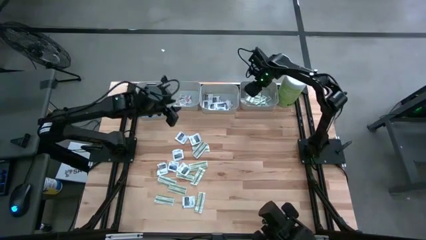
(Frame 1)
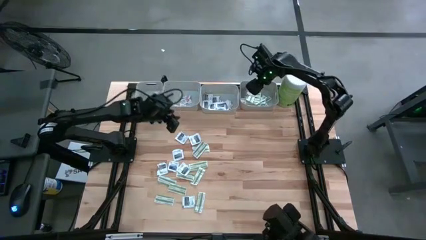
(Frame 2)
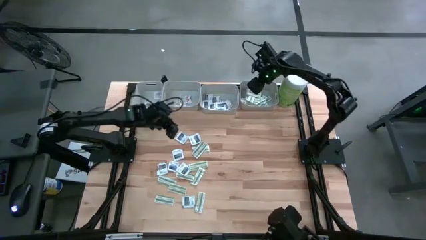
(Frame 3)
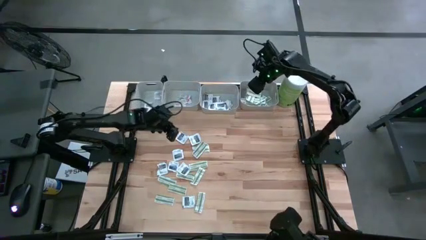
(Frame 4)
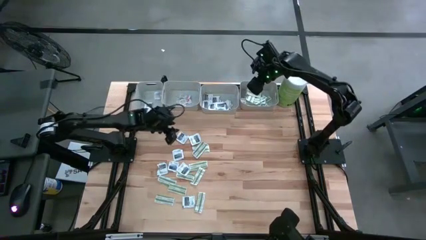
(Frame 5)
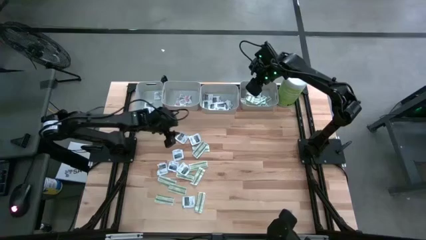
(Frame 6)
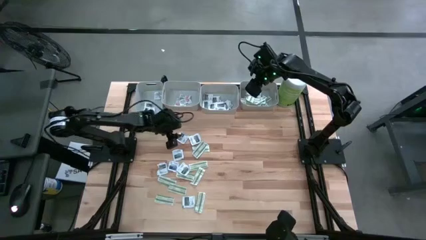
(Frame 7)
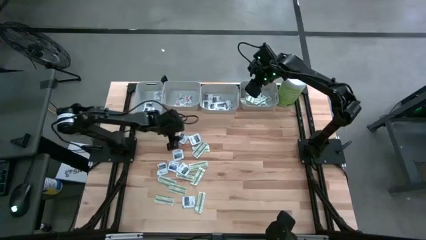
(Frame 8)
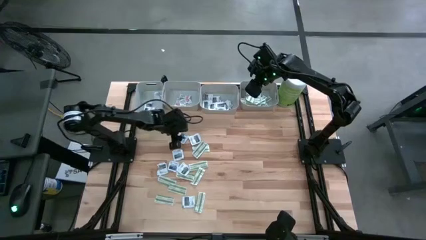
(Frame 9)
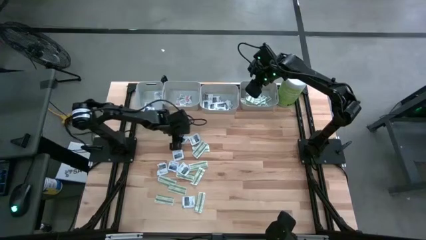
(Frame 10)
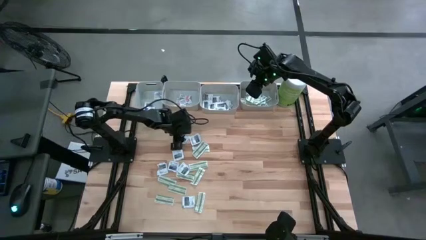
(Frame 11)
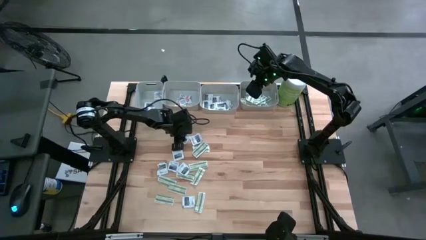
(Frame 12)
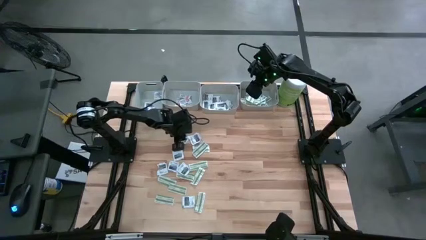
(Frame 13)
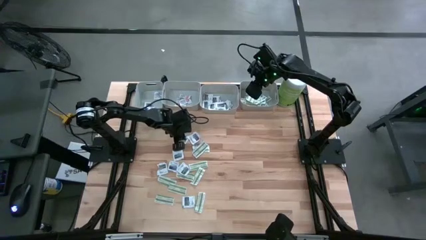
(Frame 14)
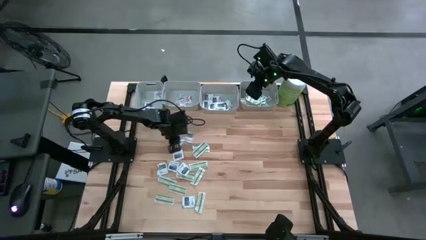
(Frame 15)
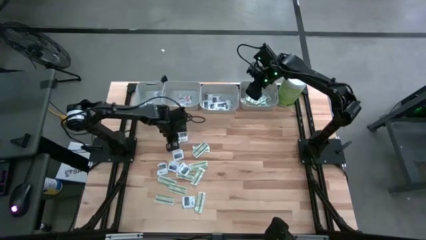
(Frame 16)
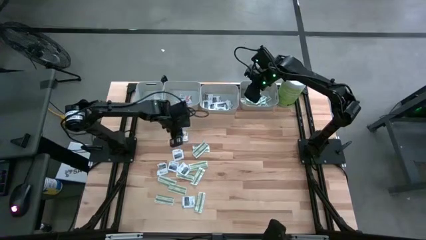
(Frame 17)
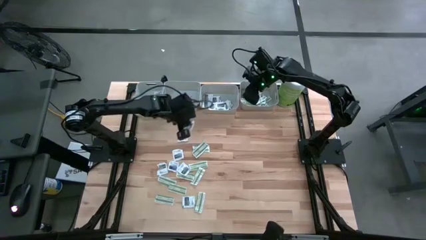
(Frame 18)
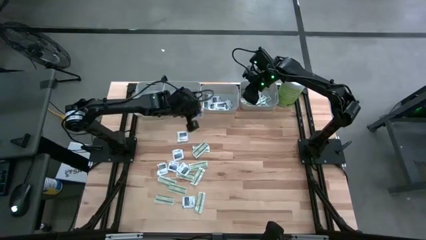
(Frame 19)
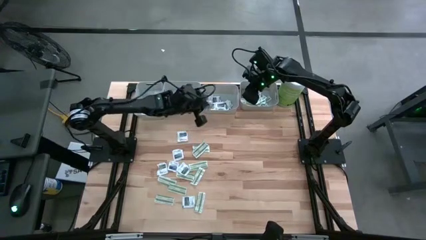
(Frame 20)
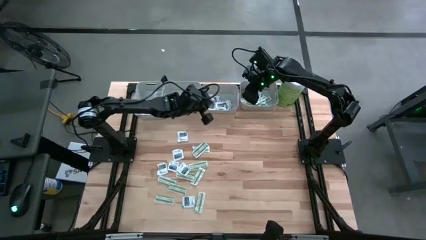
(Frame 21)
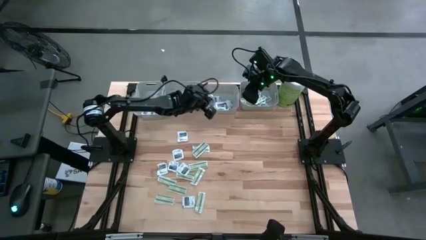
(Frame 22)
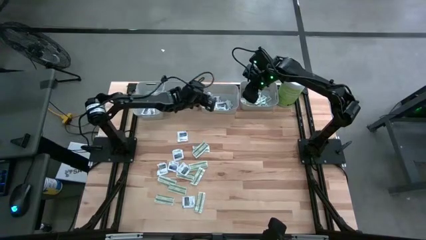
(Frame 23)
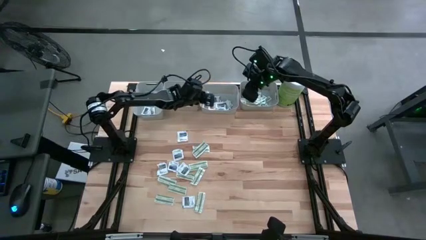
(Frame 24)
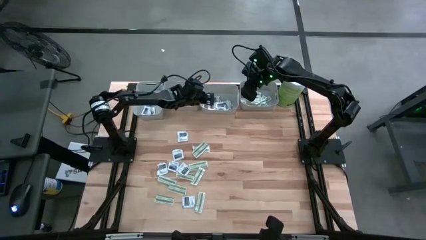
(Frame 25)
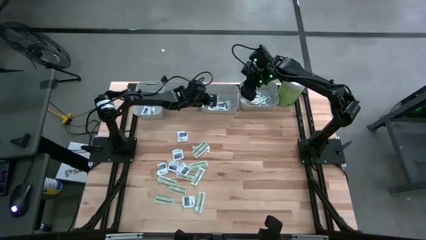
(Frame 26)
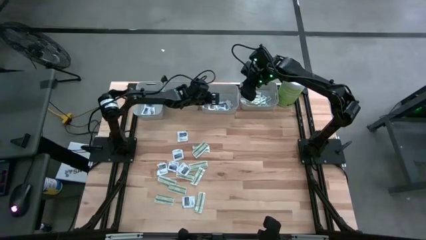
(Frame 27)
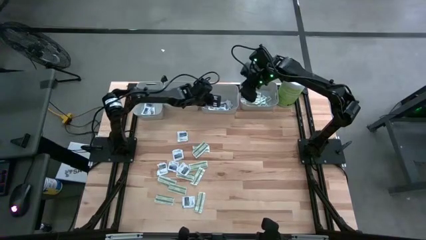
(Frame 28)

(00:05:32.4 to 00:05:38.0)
Task: Pick & Place First Aid Supplies
Put the gray towelette pack into the middle right gray bin

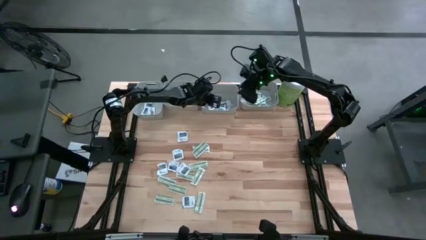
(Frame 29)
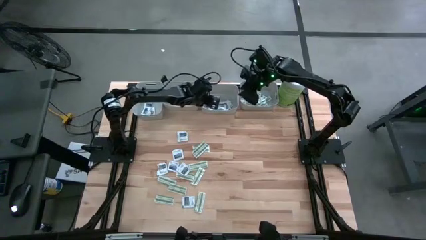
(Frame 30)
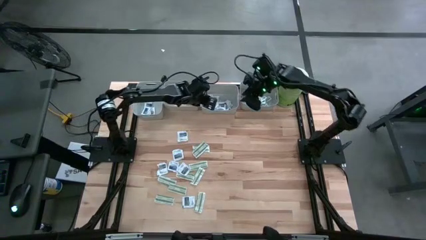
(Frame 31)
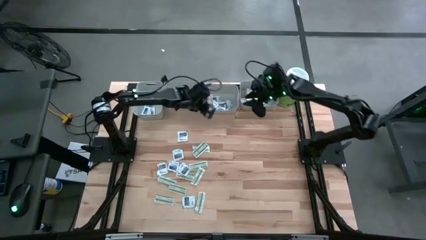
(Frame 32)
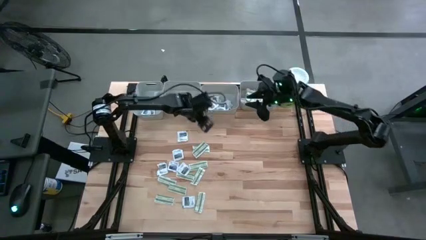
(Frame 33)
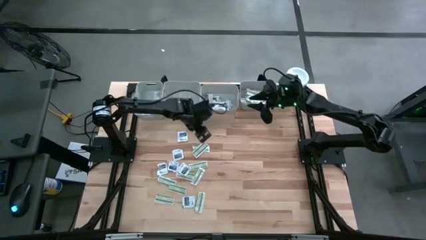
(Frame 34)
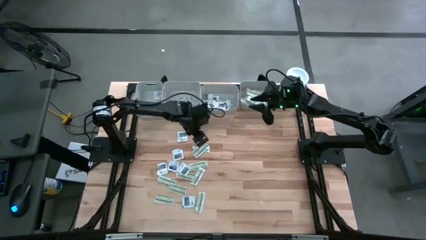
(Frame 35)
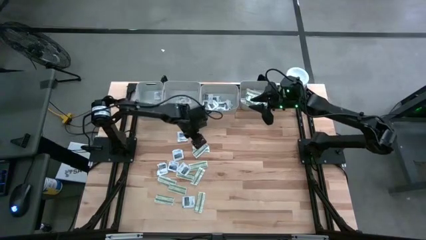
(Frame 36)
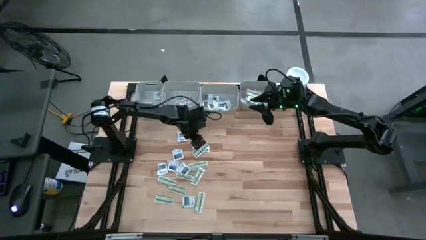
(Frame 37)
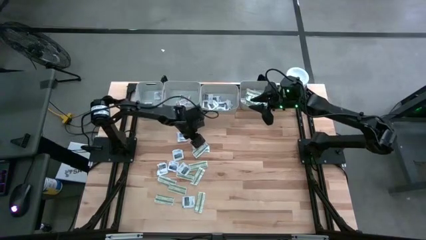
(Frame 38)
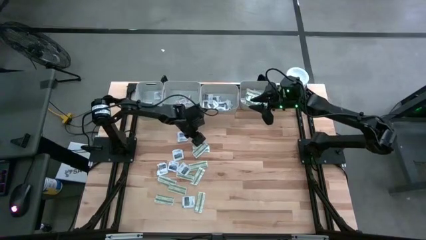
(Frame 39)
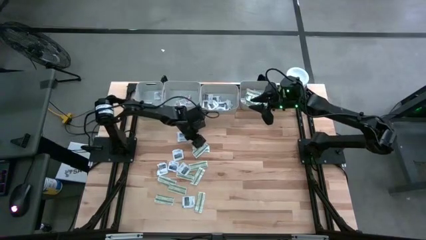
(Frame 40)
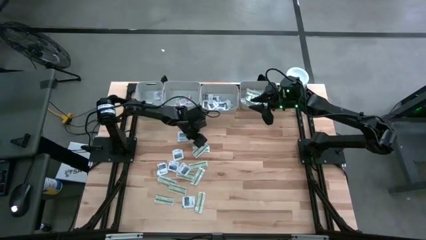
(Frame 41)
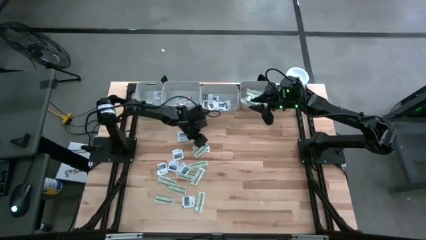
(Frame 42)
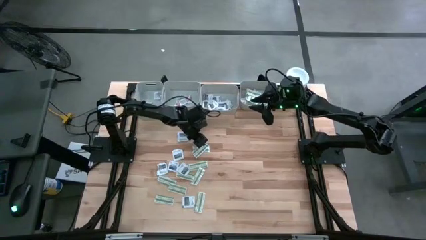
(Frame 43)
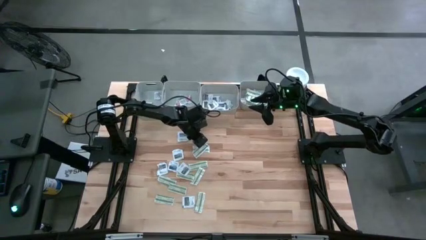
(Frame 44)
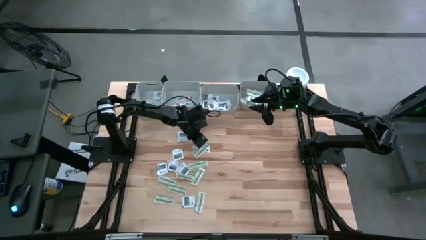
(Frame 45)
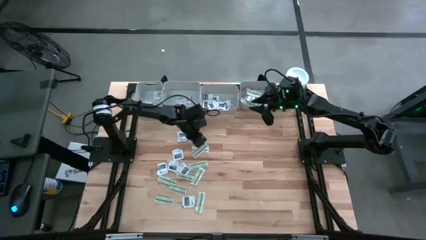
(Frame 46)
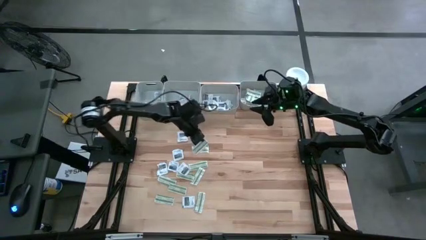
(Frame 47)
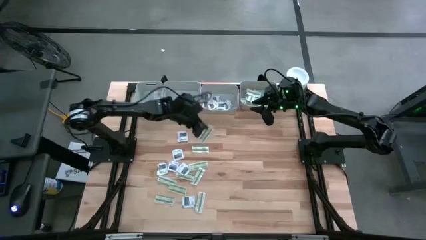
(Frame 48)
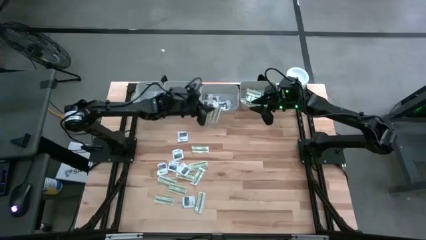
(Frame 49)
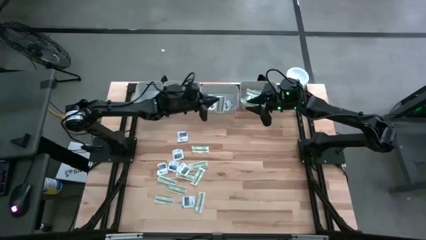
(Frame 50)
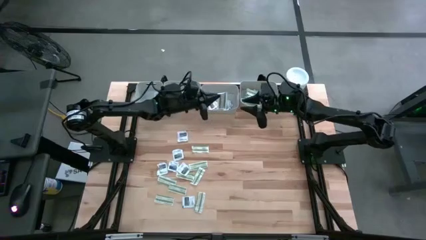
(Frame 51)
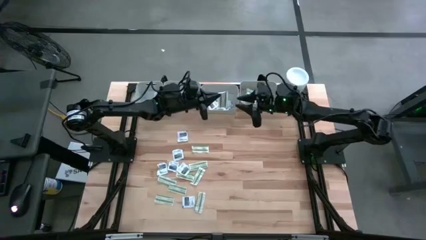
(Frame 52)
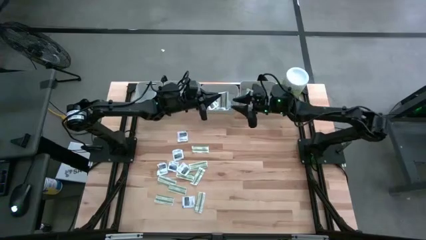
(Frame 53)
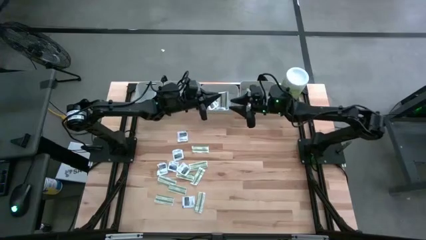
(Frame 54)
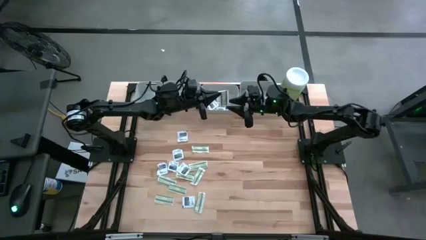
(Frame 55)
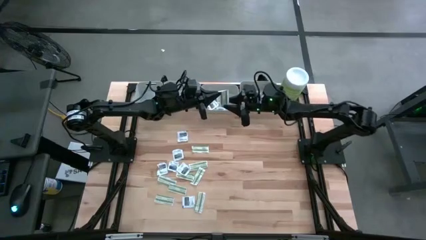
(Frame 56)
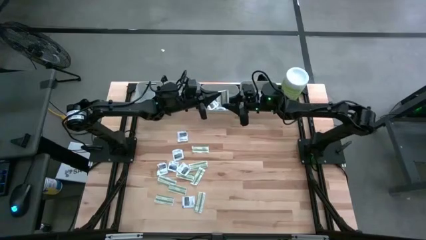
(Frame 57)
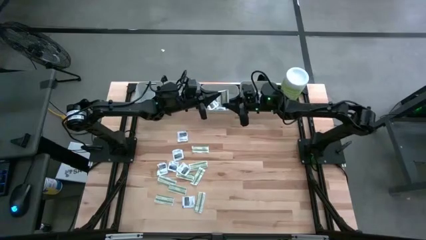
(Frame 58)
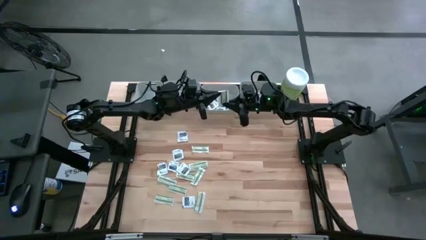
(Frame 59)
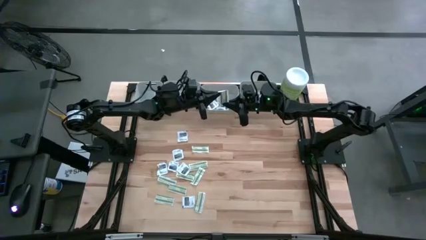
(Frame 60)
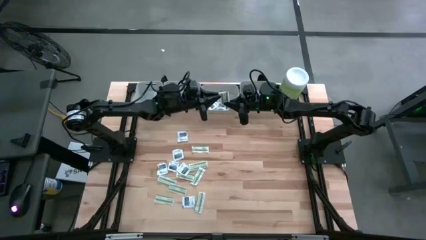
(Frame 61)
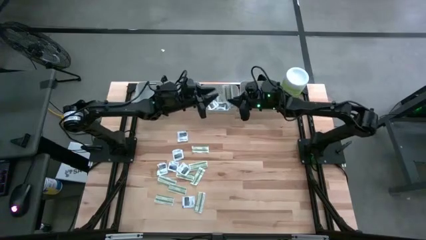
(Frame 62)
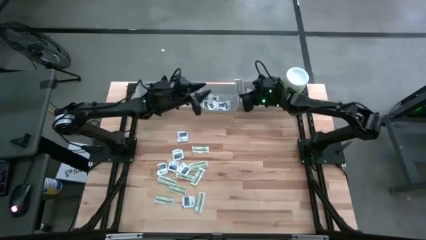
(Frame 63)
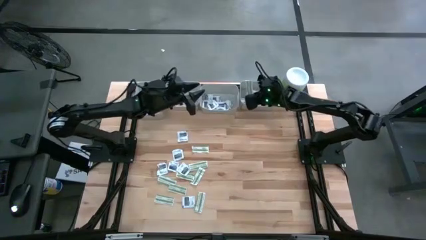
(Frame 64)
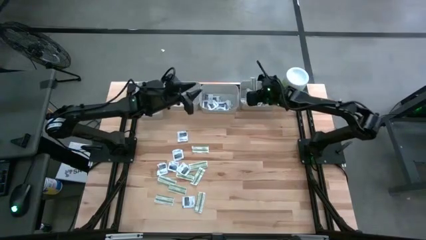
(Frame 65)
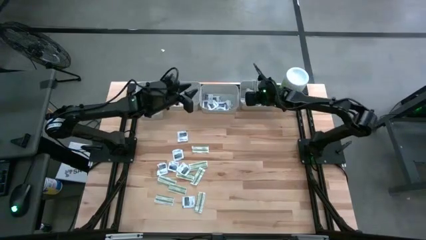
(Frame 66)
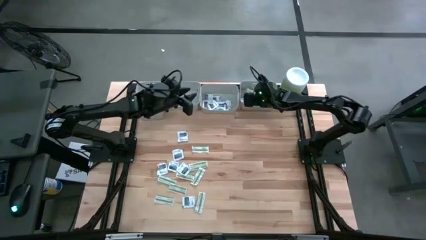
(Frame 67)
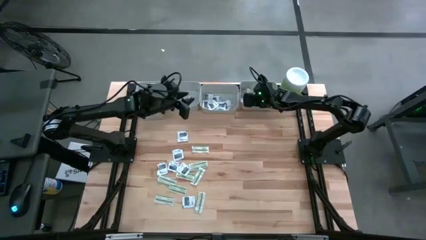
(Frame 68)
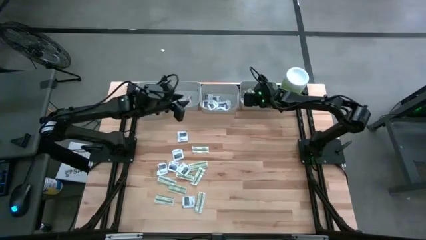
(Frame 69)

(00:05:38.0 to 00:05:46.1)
Put the green bandage into the right gray bin

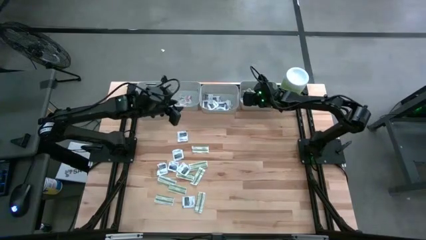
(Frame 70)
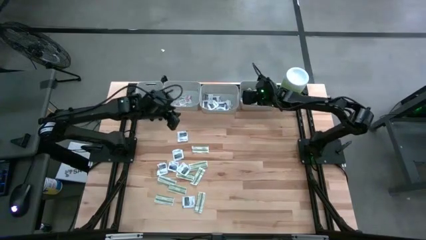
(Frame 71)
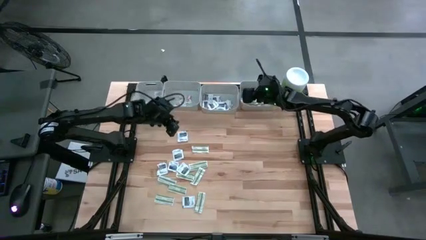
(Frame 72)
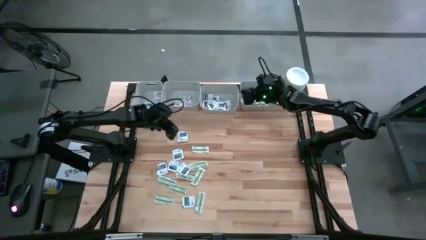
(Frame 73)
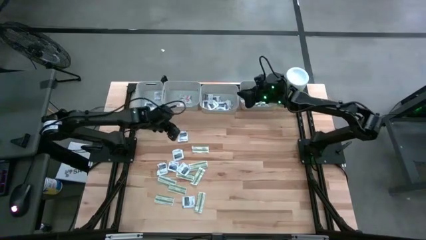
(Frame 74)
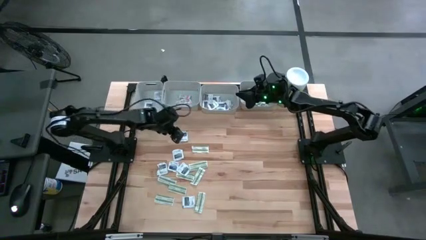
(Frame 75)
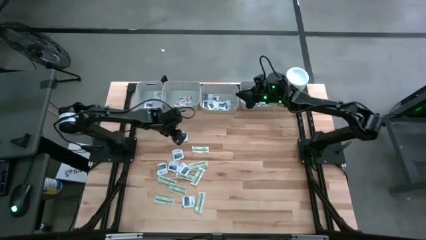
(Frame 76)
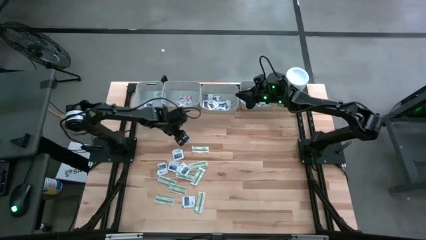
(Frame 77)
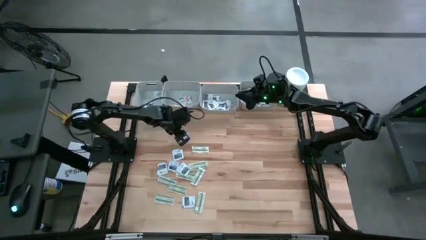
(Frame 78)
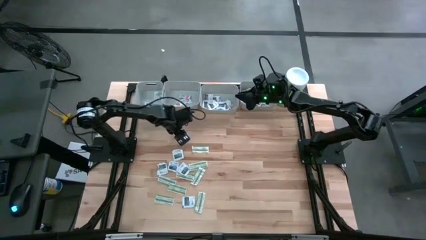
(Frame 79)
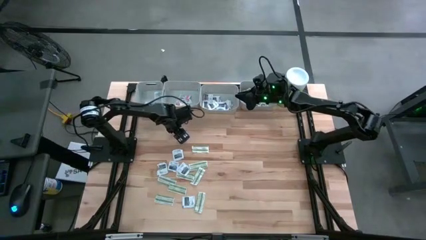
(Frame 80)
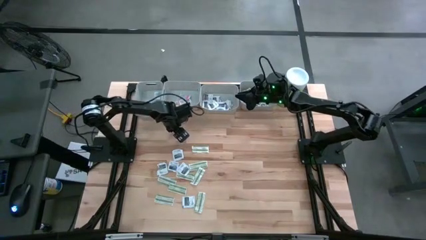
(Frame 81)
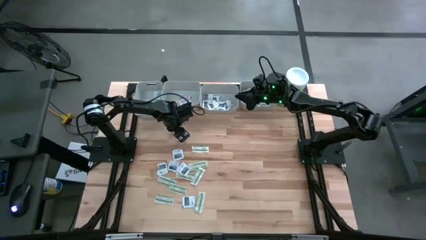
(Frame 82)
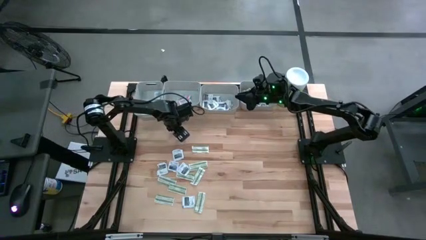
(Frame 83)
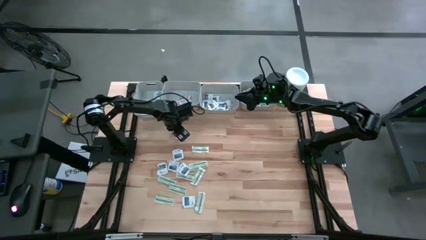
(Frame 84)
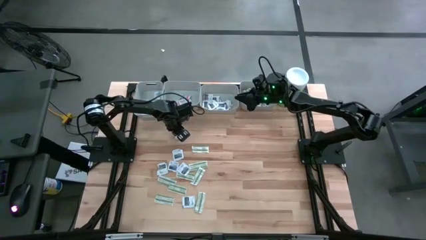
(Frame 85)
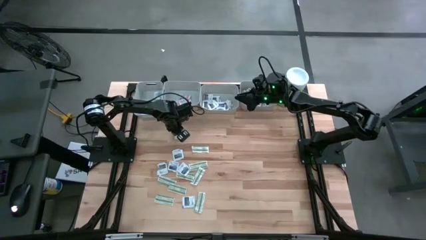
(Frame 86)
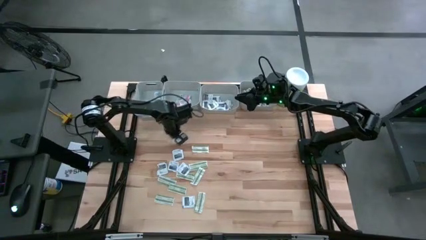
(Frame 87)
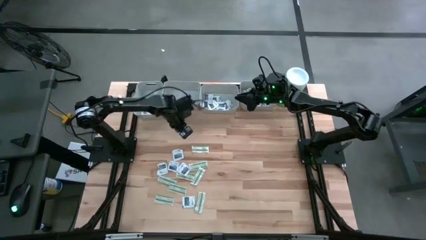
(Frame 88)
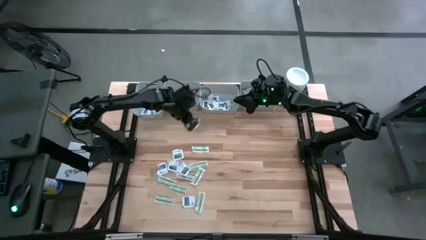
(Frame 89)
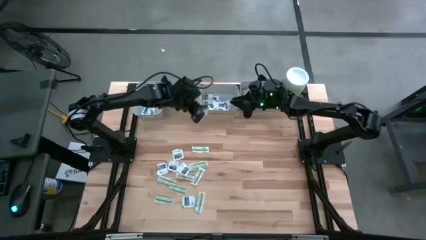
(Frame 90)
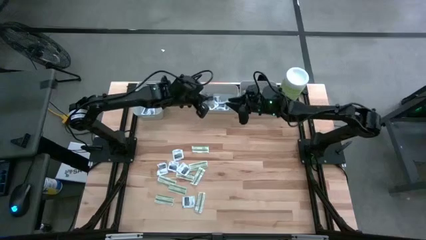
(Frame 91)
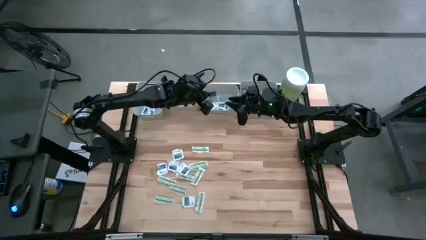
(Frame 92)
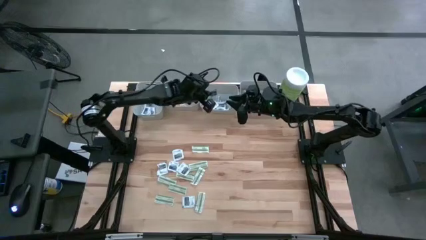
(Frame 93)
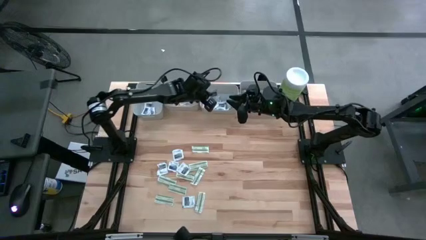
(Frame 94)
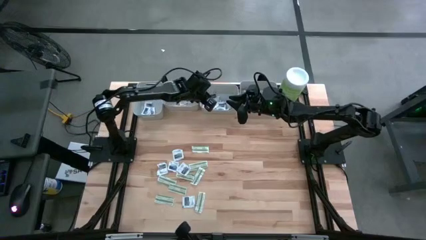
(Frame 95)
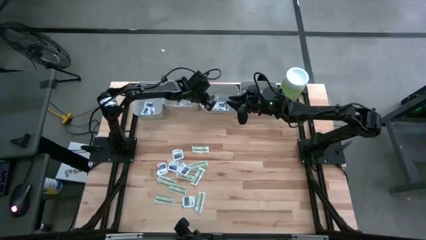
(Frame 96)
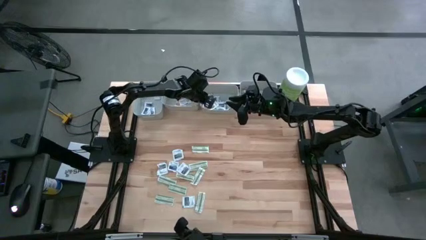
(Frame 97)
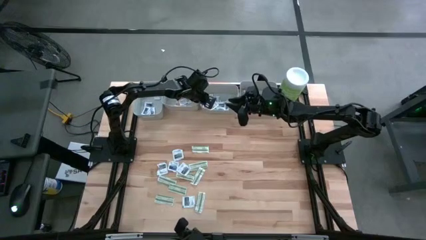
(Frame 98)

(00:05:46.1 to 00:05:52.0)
Put the gray towelette pack into the middle right gray bin
